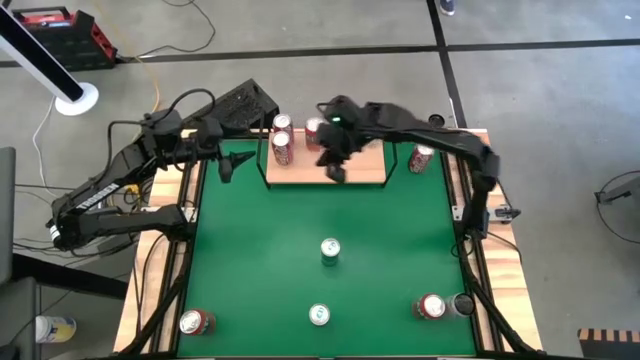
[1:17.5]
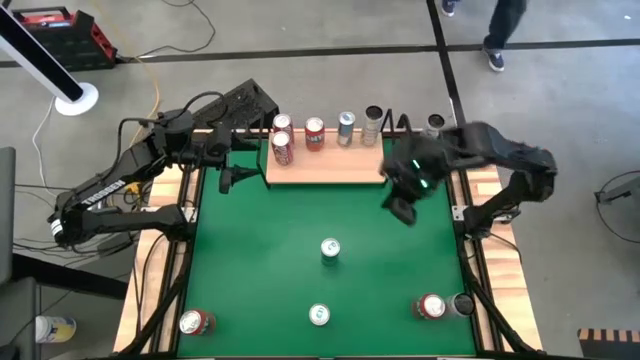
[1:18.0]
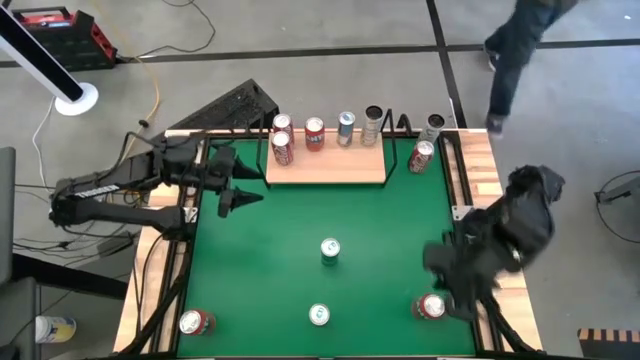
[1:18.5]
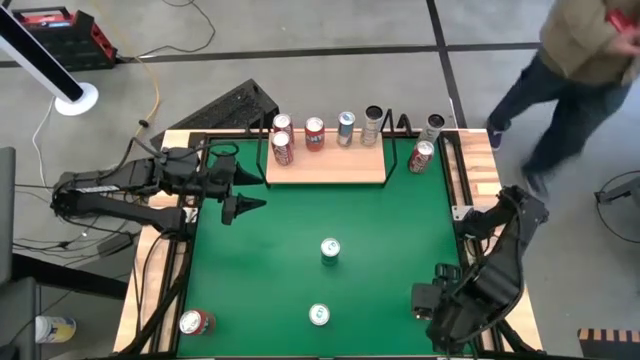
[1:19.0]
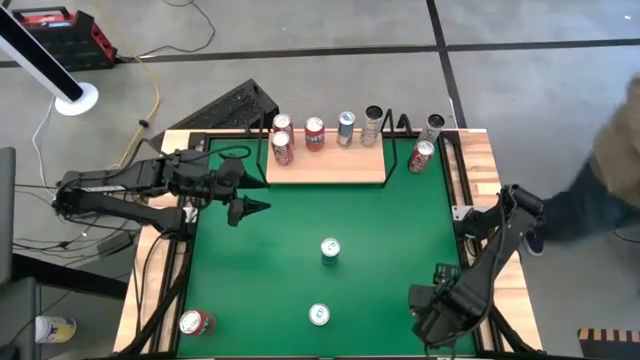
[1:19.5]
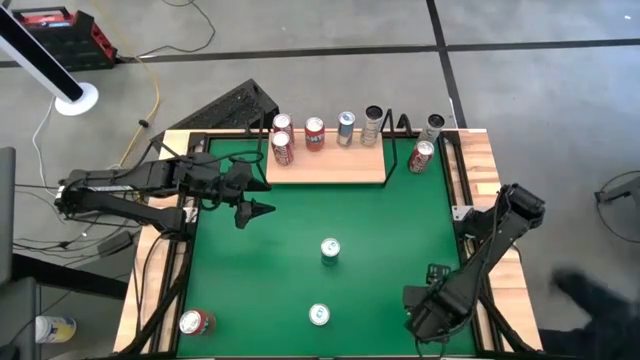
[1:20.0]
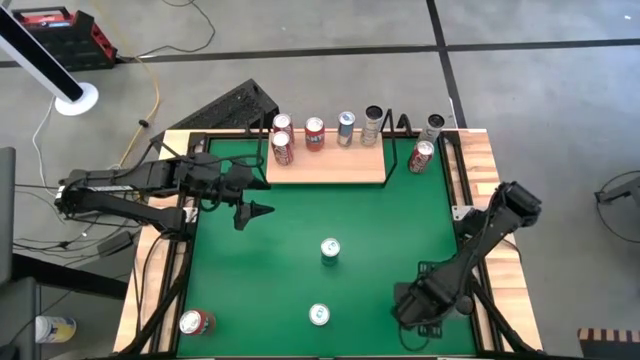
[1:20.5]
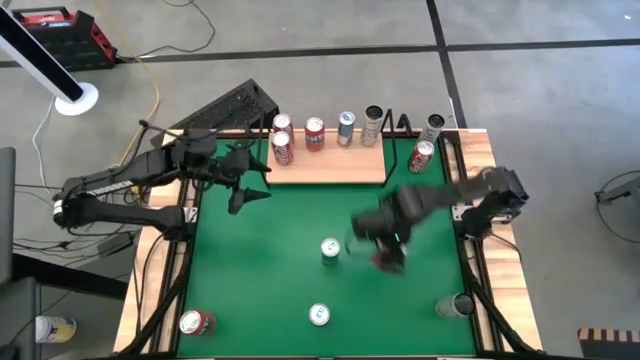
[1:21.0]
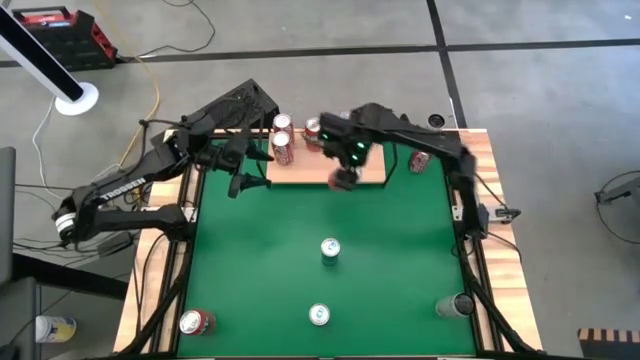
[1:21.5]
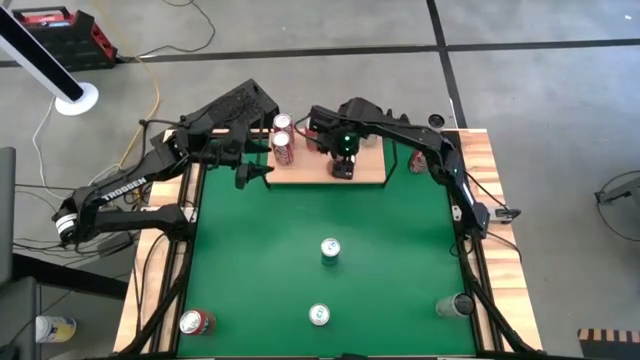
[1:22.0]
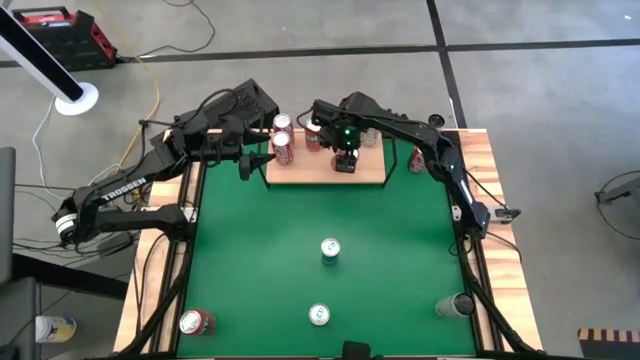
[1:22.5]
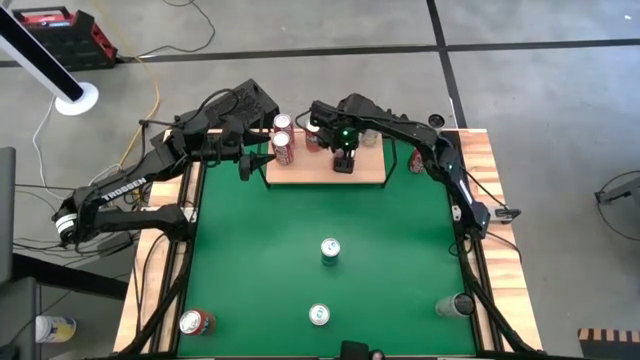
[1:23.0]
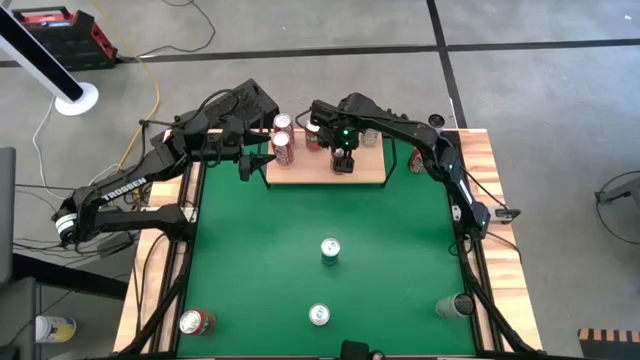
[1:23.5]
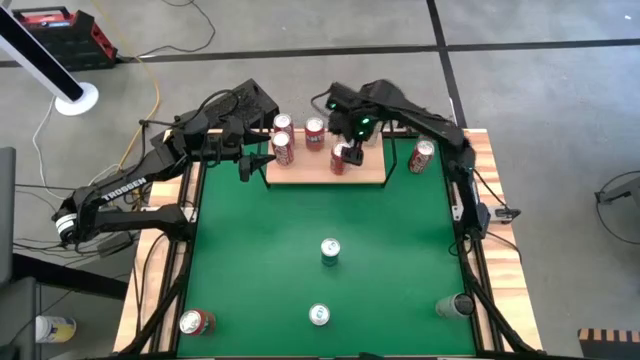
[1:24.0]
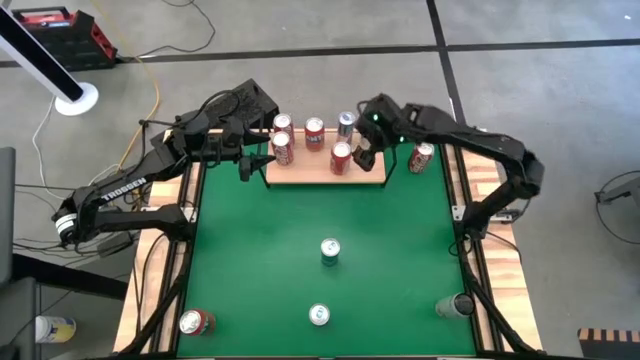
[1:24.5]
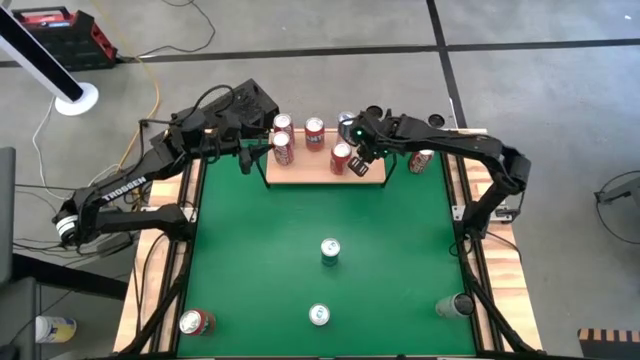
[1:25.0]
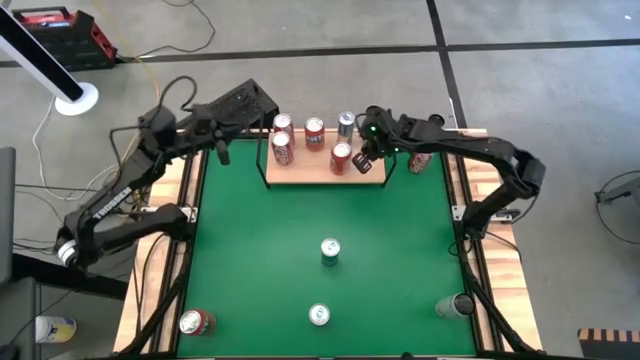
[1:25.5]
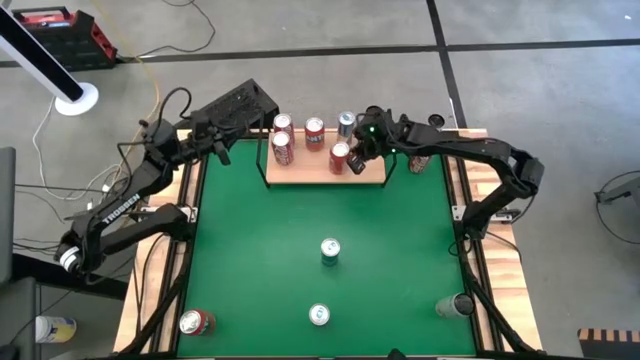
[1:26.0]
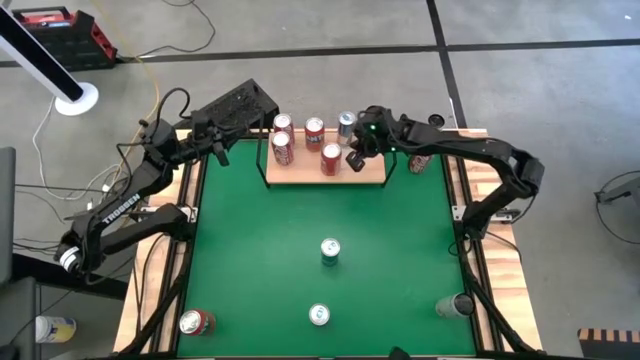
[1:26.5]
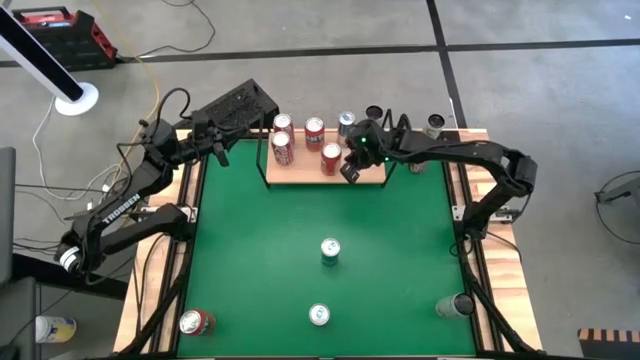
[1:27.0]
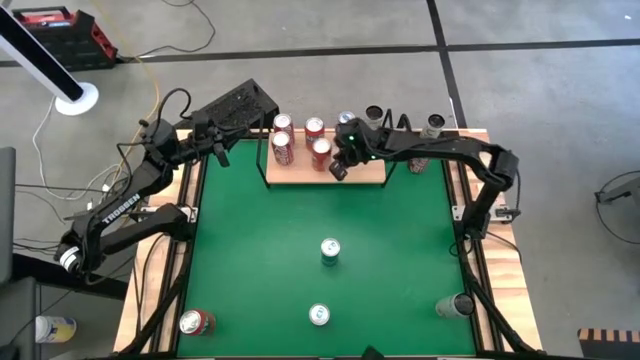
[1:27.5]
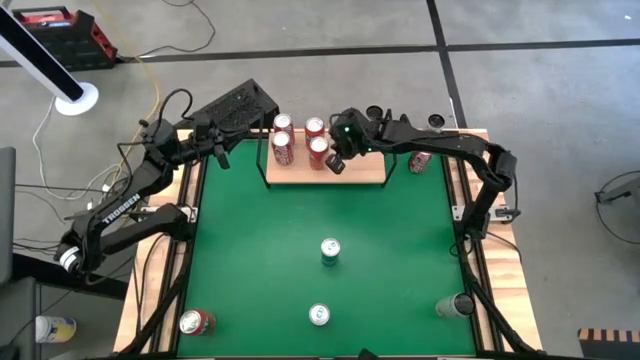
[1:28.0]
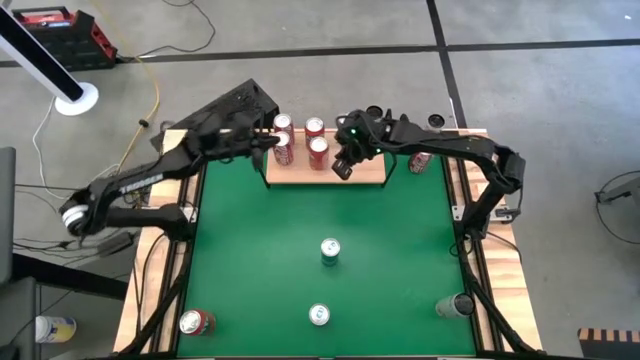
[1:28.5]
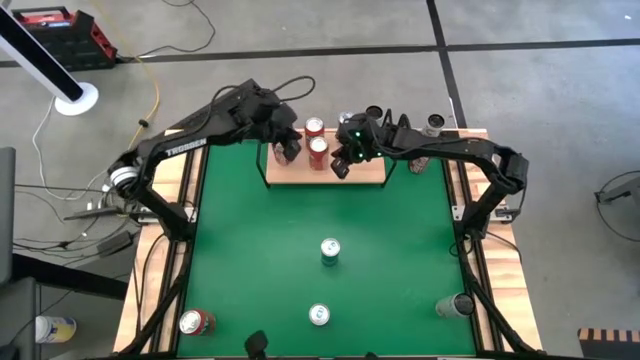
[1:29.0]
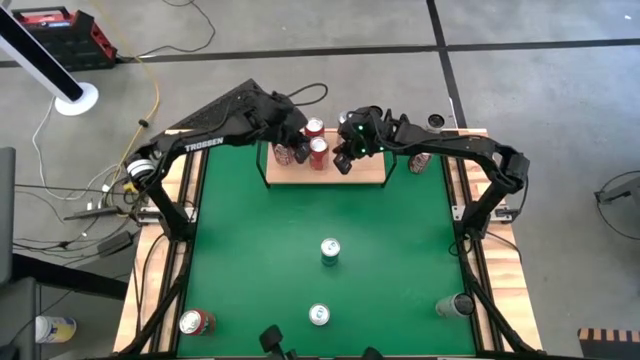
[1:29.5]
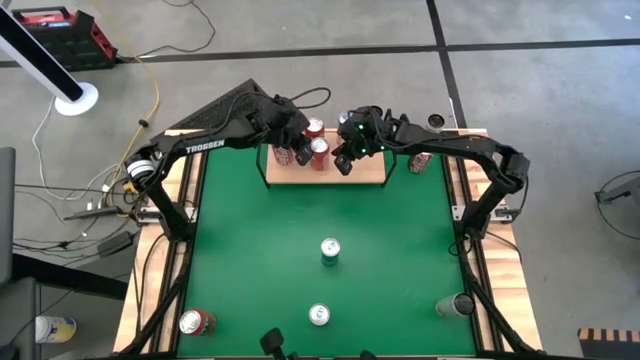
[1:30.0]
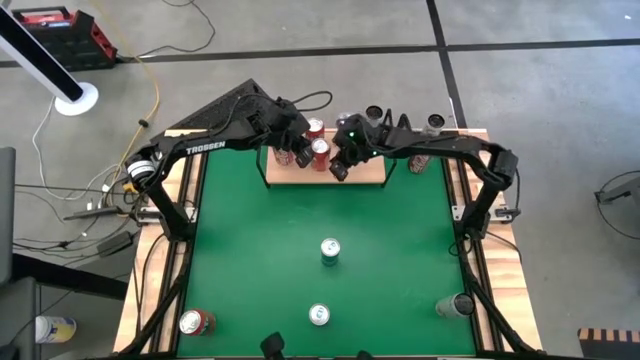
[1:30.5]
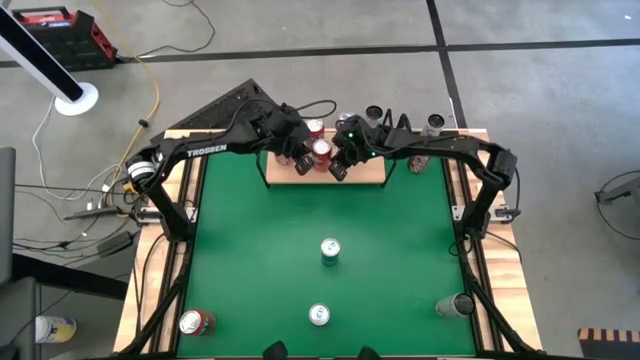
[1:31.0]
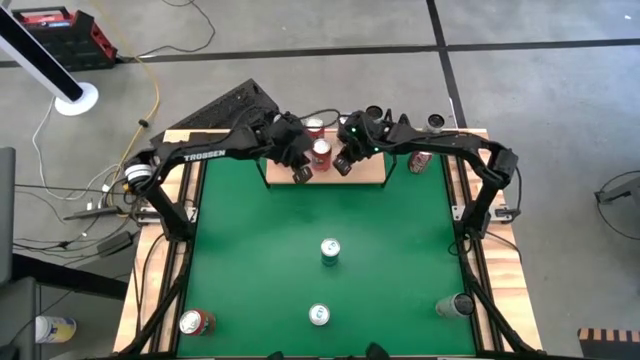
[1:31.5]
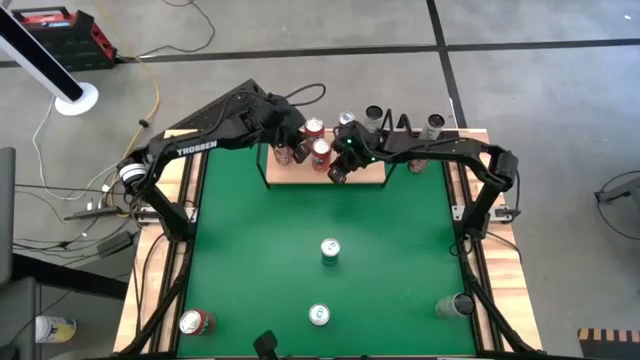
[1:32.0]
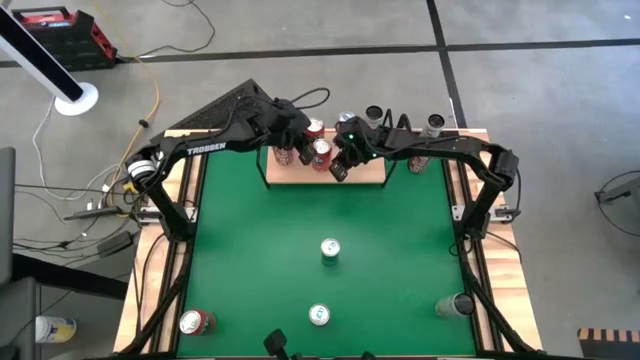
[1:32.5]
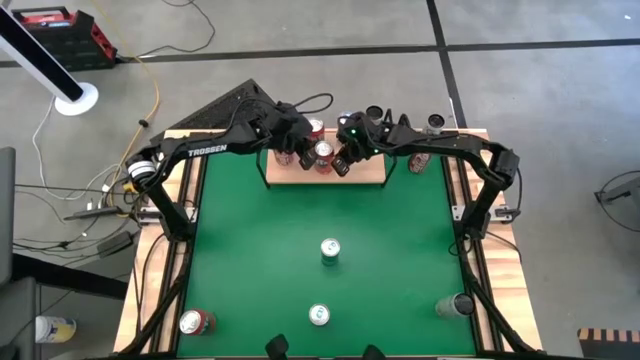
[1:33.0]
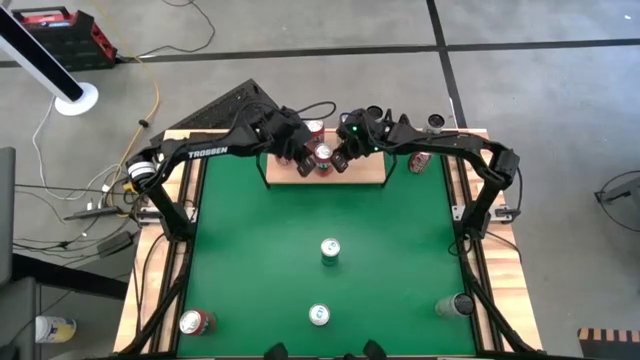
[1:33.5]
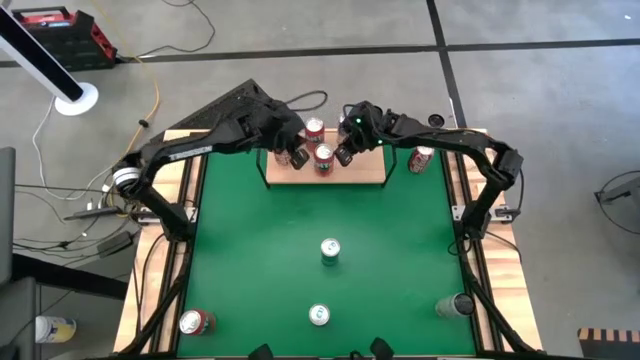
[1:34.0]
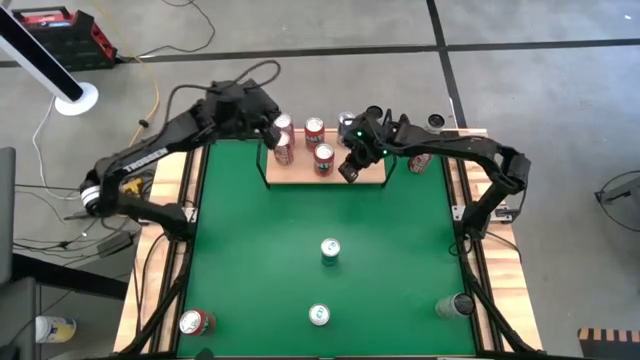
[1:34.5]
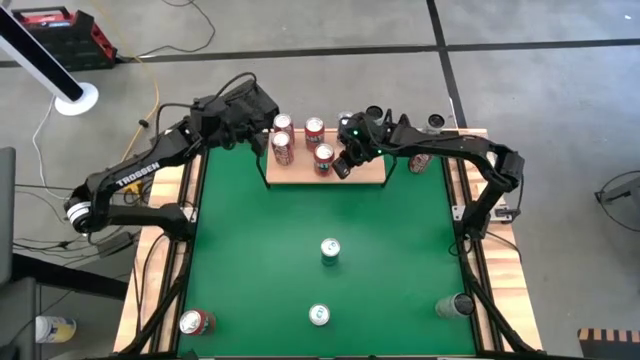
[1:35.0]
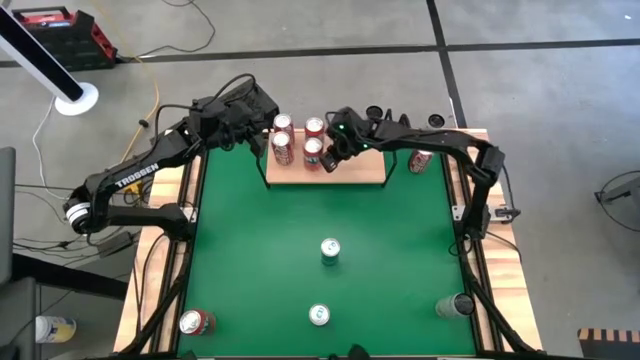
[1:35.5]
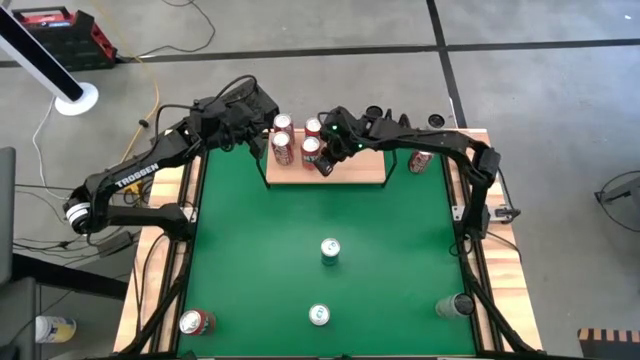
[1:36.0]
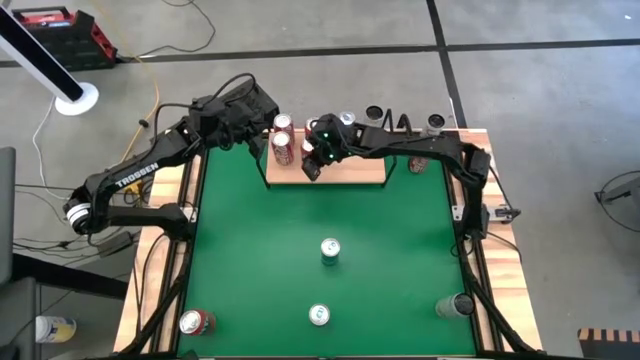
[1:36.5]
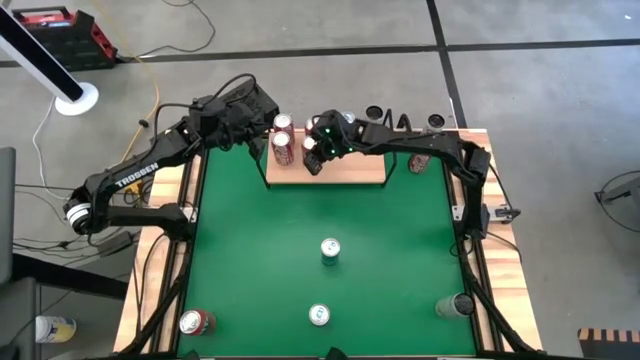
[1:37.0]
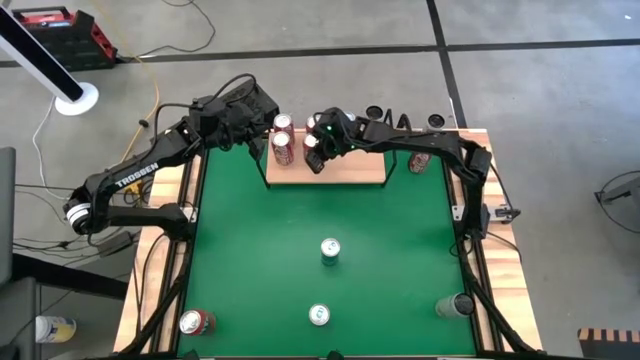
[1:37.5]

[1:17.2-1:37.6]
Task: Place canned beverage on shelf
Put the right orange soda can on the shelf

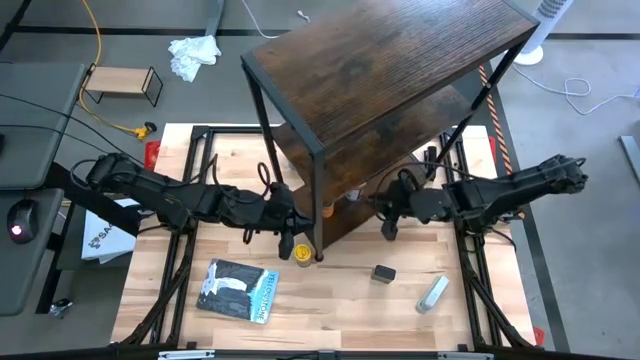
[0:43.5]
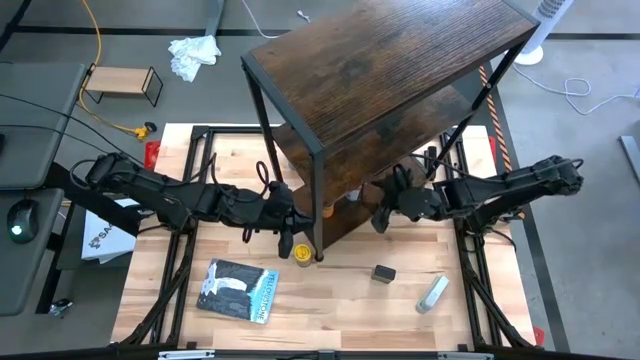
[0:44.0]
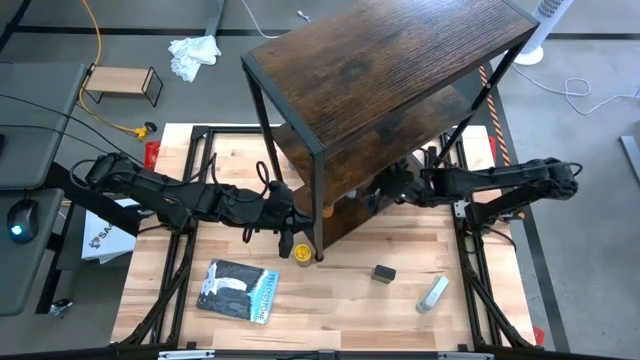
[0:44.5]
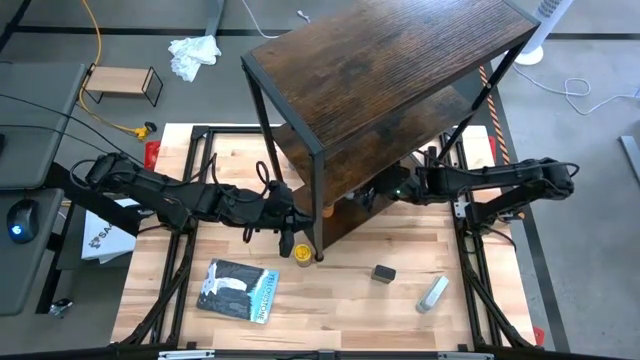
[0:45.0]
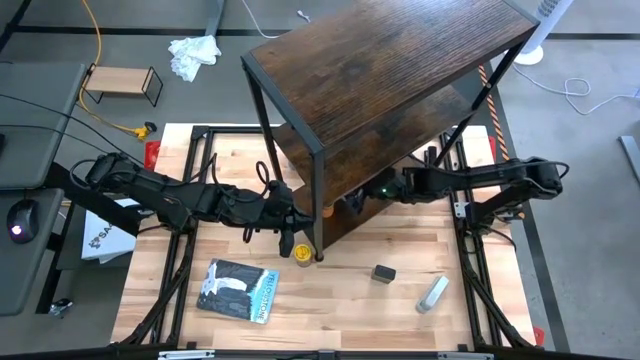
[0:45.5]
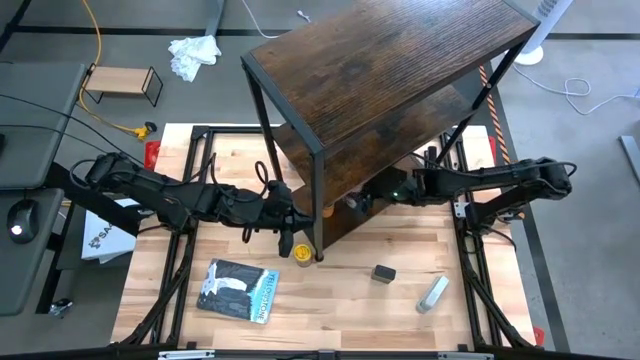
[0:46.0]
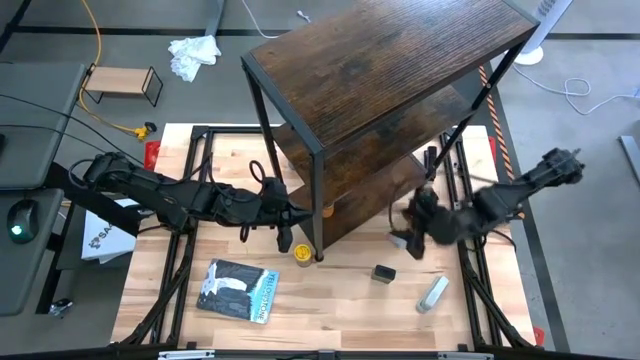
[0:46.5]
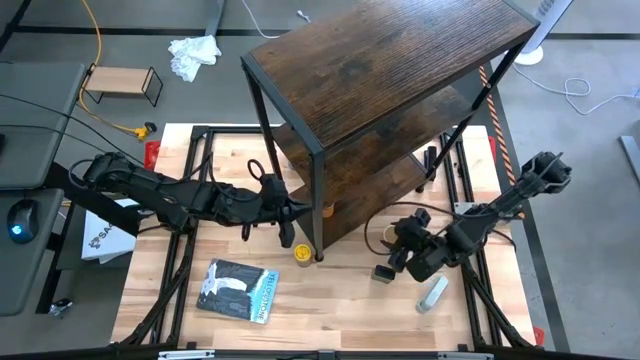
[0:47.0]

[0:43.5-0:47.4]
Task: Shelf spices
Remove the gold seasoning bottle from the shelf
